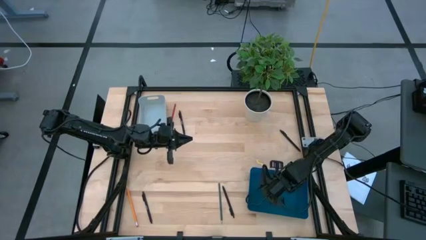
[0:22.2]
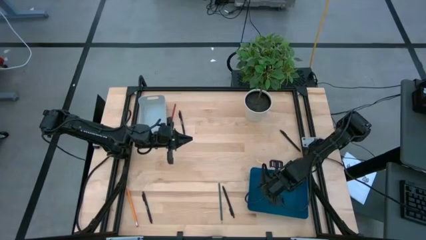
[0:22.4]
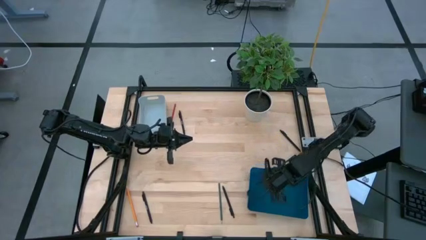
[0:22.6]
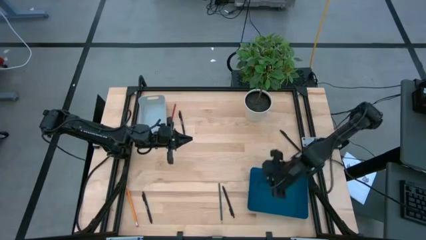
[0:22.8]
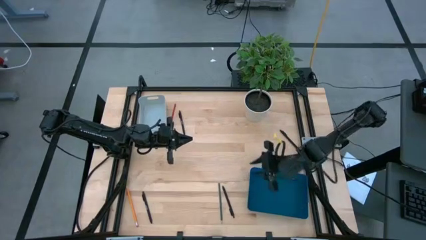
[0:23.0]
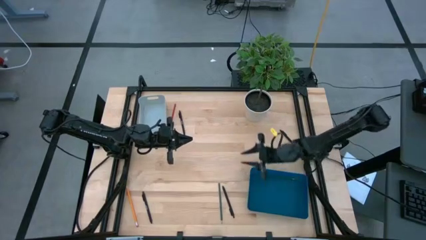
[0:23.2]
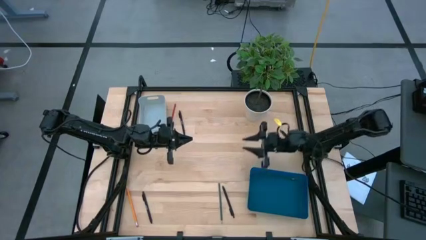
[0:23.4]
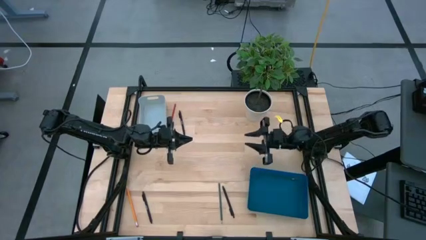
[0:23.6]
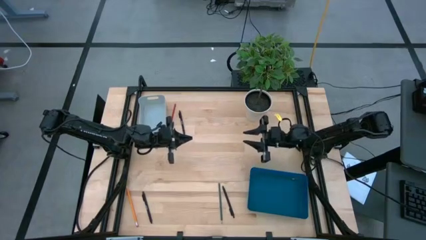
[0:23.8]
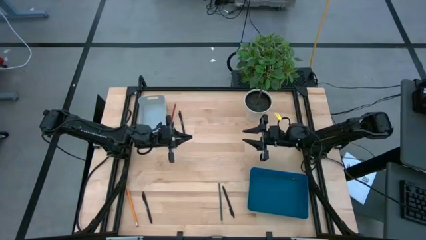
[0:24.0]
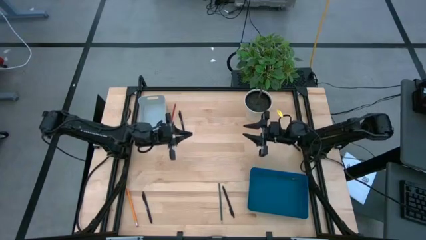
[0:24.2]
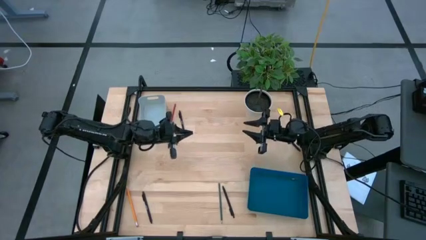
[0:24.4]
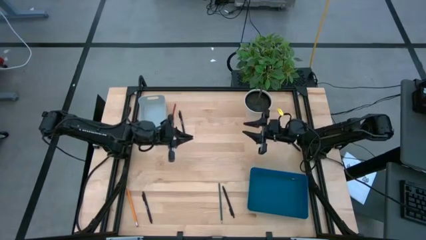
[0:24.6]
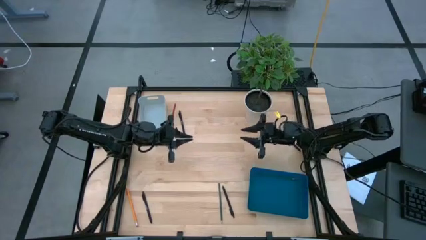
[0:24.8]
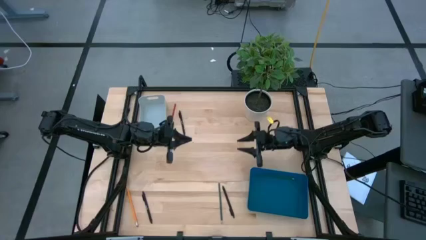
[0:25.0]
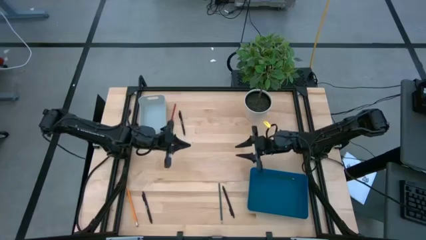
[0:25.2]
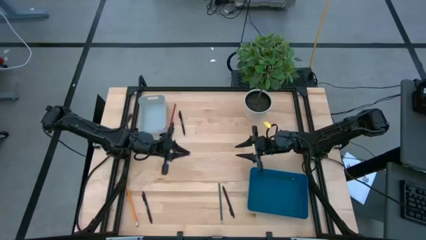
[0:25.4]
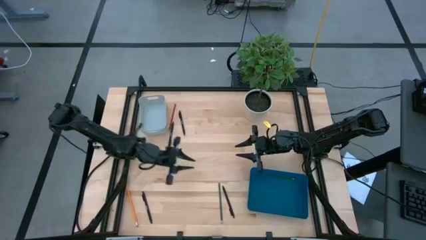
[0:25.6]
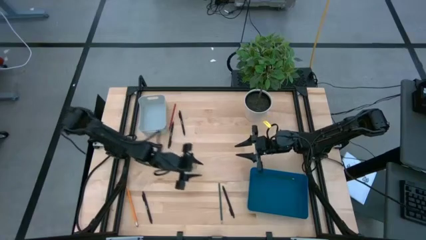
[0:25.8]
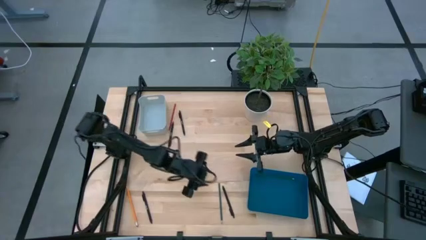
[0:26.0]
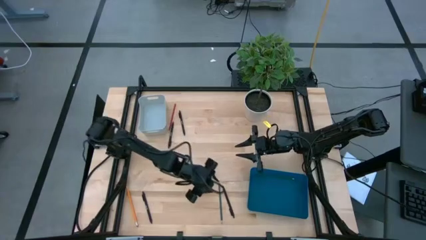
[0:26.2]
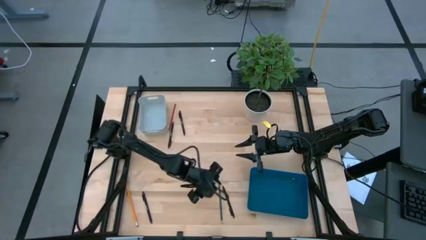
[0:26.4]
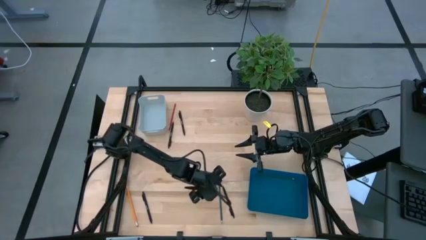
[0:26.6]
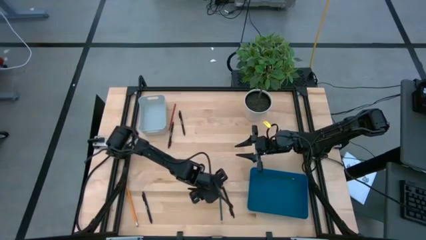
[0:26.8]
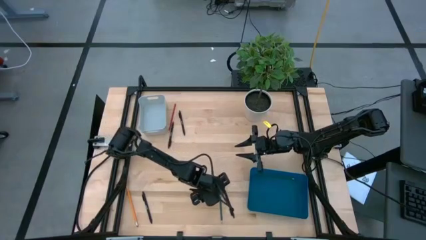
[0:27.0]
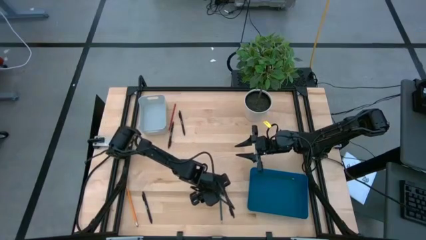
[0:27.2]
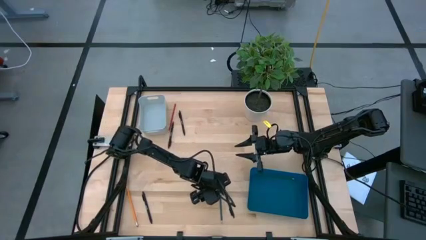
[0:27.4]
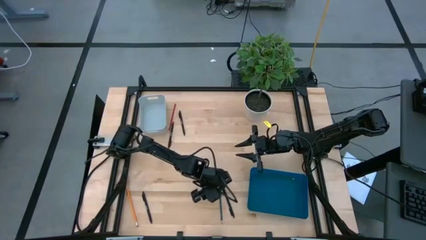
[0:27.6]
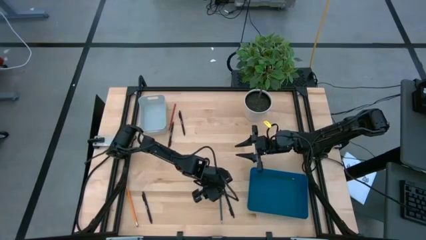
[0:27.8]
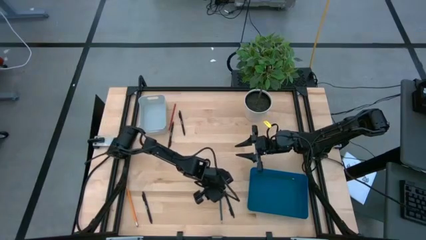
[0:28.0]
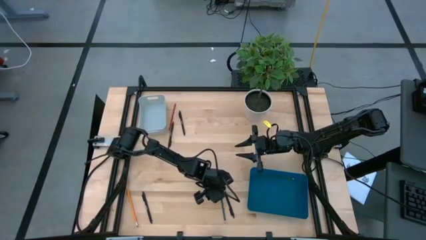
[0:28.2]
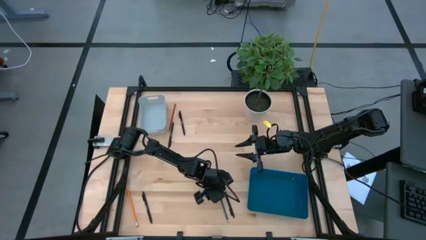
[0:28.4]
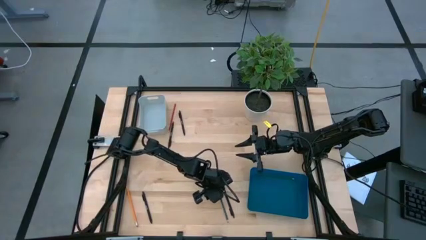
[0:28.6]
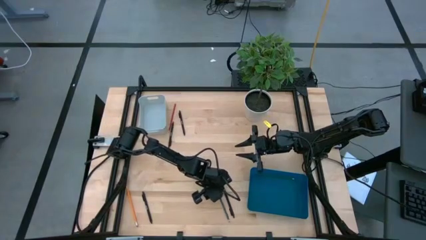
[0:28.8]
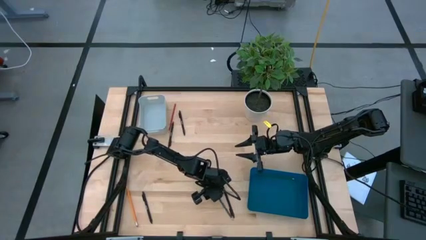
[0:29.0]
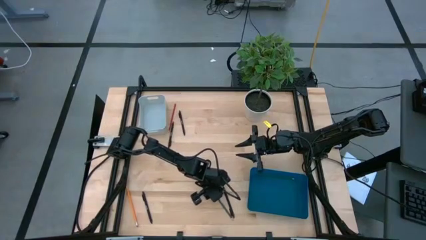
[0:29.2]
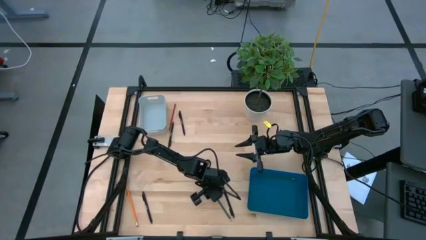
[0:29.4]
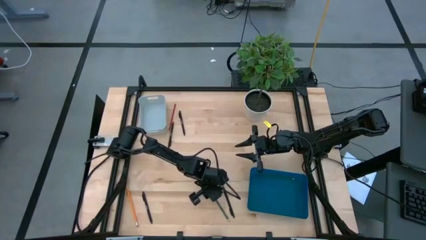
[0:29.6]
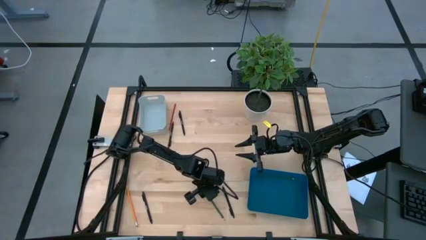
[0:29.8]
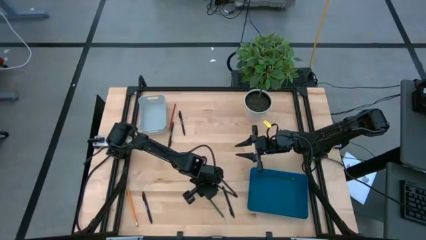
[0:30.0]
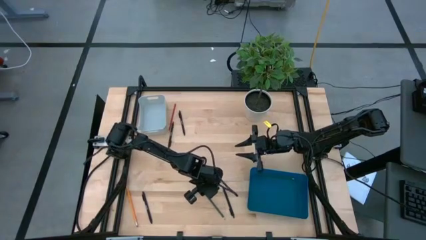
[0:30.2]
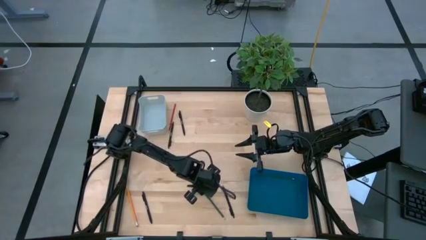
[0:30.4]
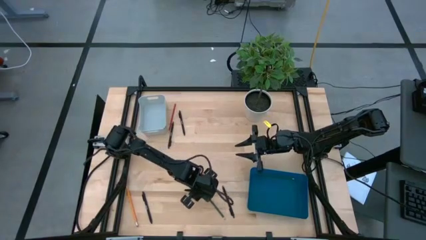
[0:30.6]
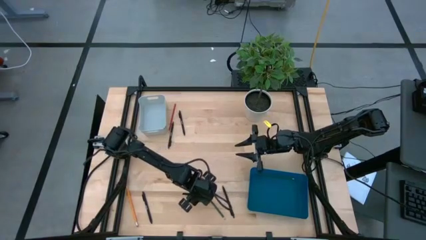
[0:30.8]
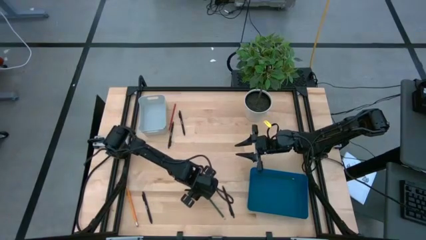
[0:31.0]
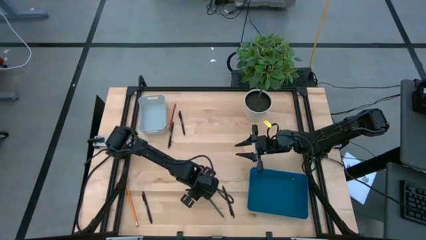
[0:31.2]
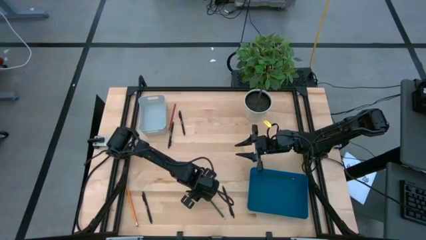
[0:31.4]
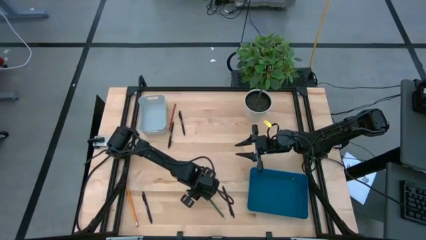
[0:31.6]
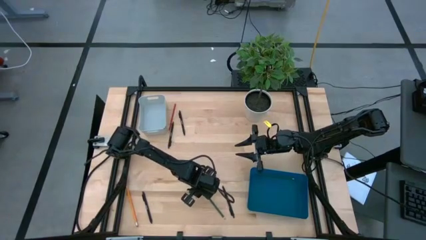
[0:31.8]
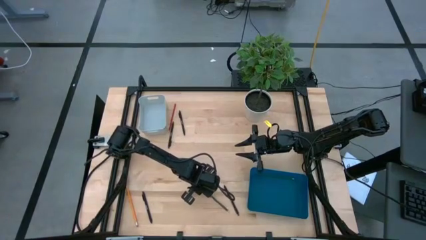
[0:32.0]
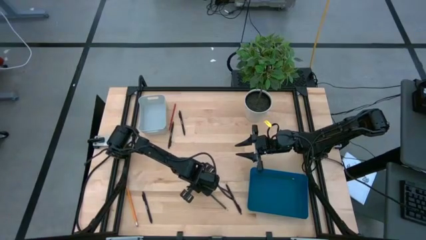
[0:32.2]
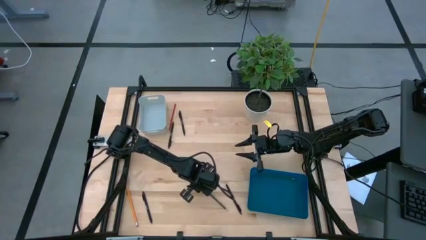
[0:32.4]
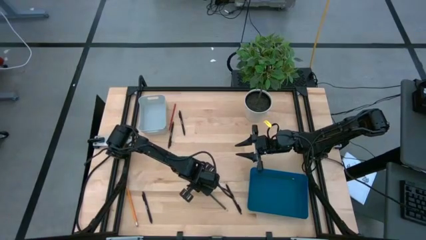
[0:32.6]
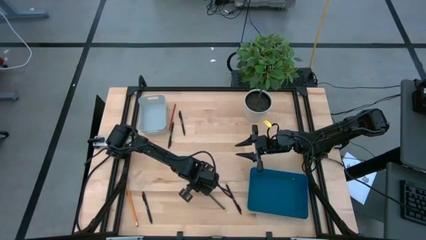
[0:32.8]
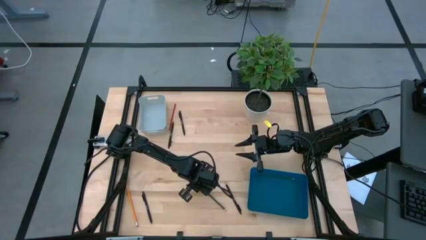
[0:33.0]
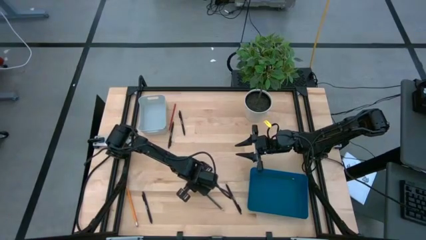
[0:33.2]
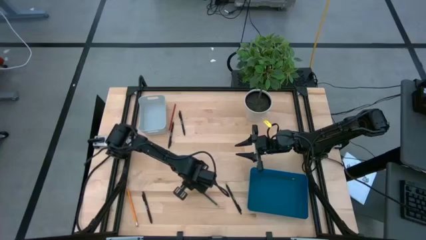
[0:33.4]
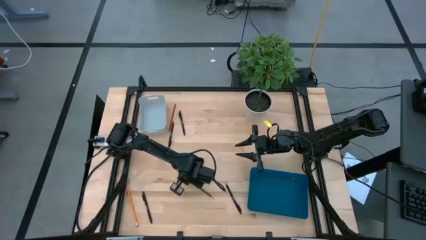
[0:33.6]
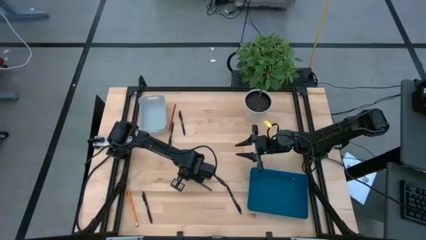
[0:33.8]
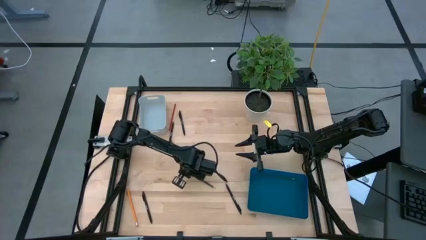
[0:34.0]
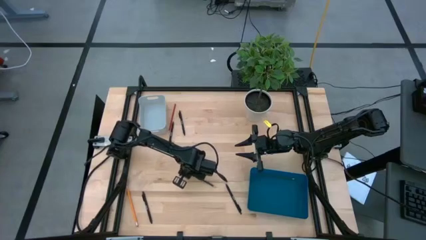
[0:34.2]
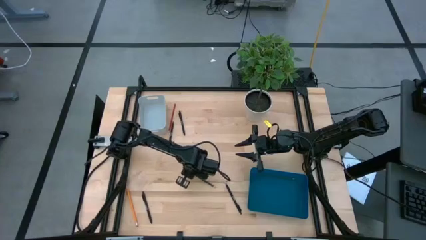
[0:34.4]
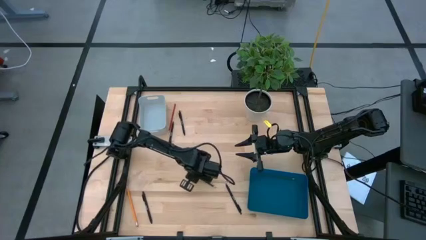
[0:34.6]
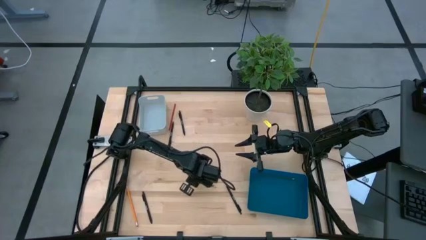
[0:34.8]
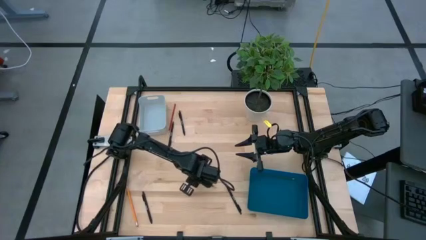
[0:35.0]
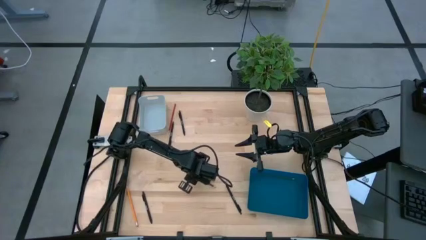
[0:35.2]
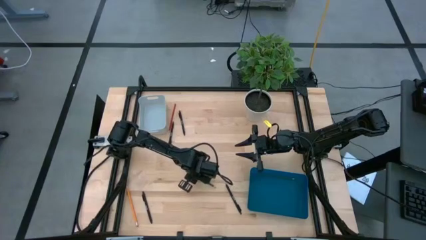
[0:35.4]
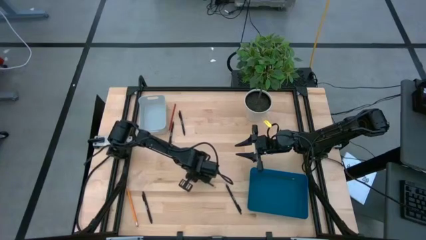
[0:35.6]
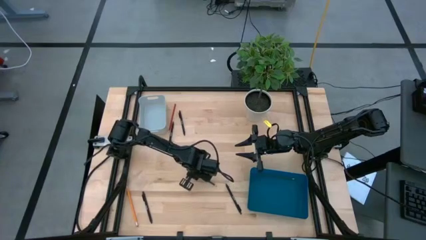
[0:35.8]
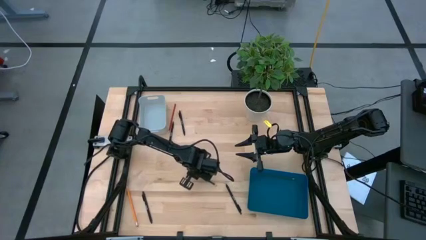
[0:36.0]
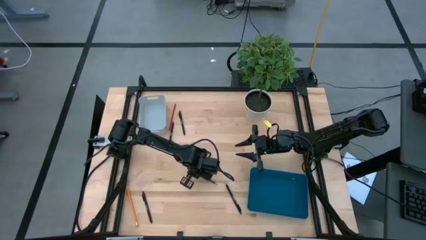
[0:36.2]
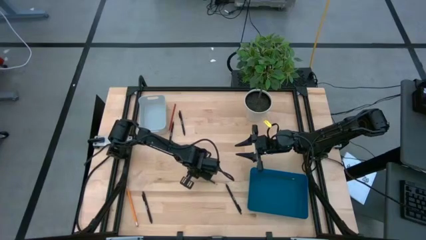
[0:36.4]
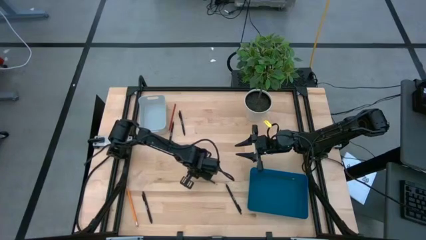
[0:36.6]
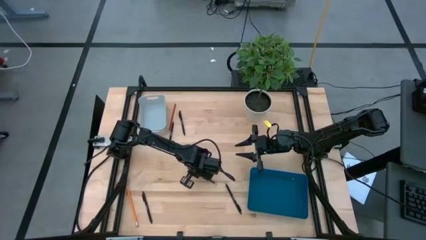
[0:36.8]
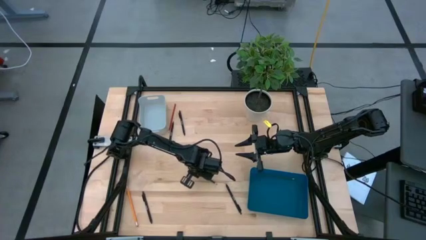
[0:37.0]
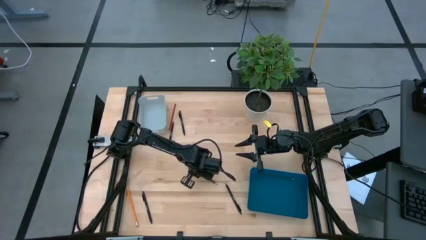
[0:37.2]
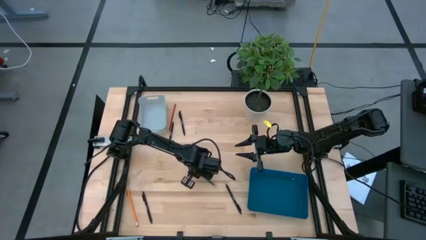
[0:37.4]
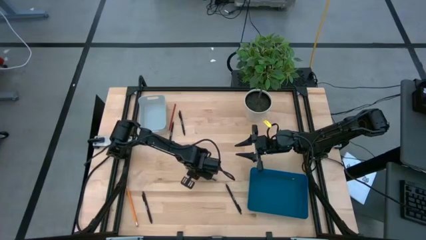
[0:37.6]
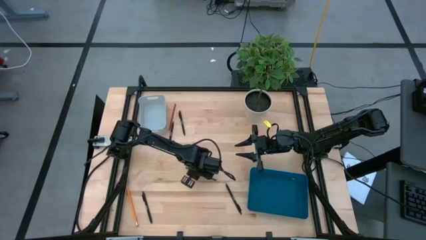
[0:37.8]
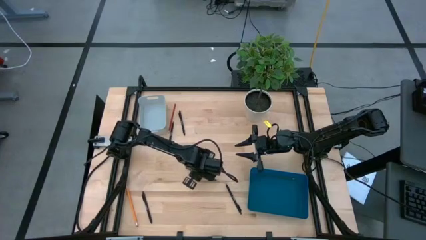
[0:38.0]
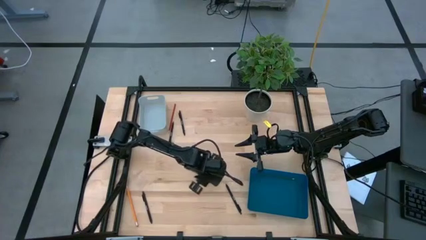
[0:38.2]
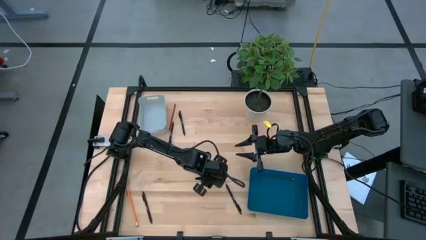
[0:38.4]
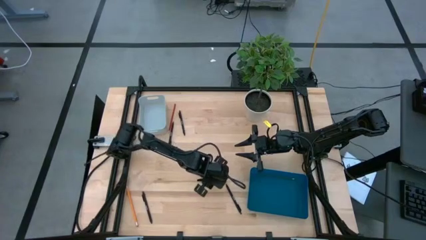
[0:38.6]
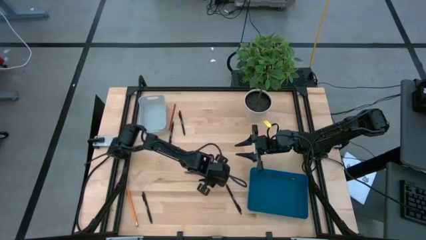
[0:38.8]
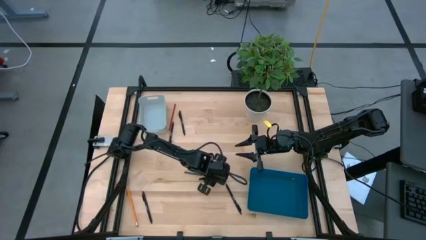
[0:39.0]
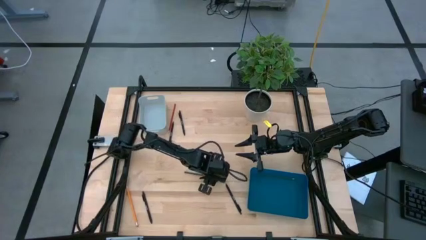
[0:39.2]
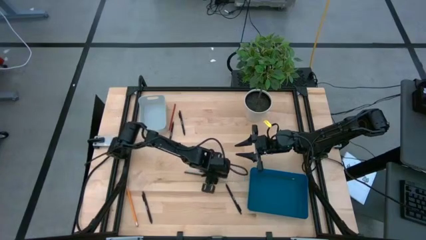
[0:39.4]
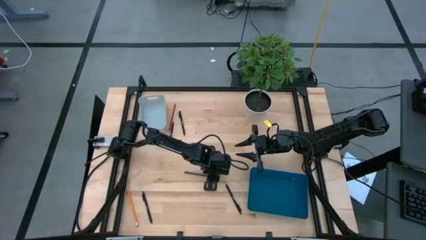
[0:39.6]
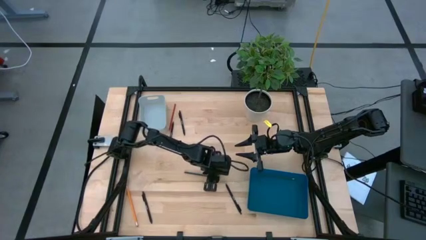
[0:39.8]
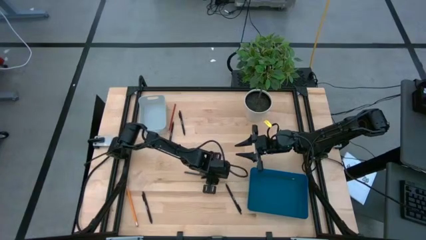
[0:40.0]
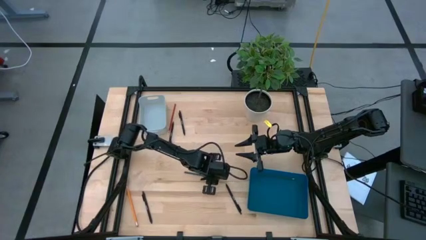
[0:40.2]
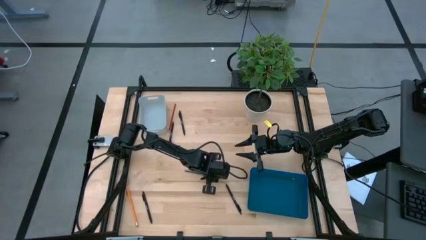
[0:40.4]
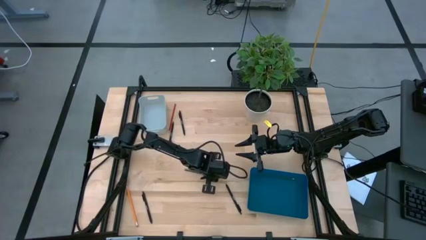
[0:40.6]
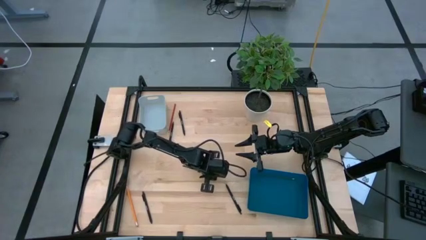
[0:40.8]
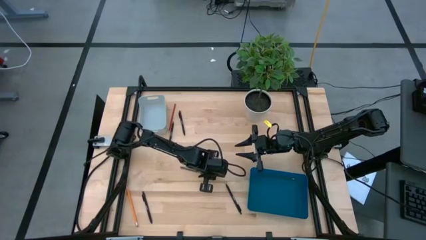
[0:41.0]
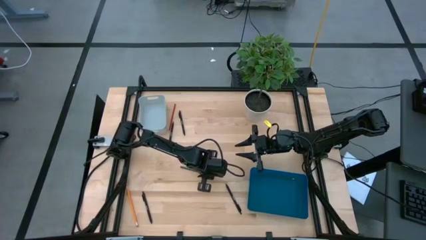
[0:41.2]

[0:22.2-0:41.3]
Task: Sort pens & pencils
Put the green pencil into the blue bin
